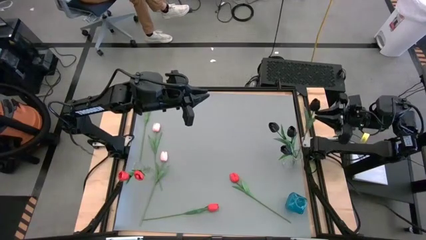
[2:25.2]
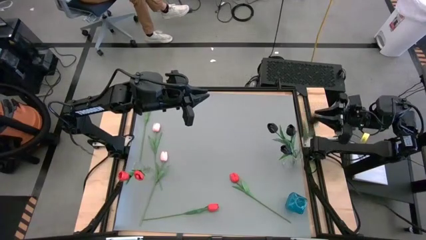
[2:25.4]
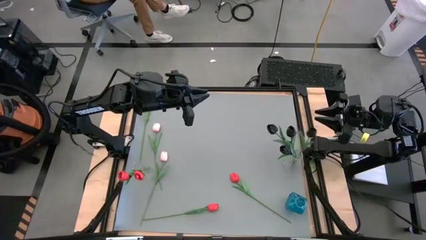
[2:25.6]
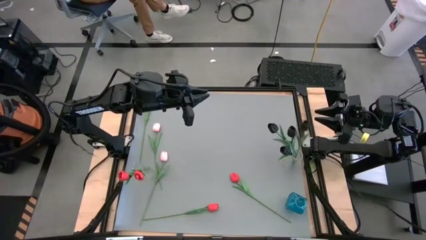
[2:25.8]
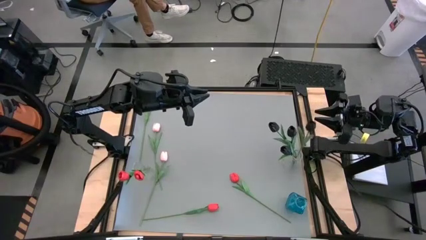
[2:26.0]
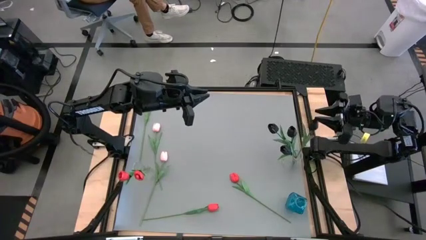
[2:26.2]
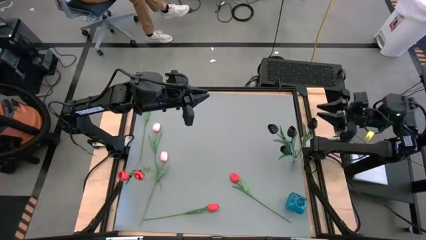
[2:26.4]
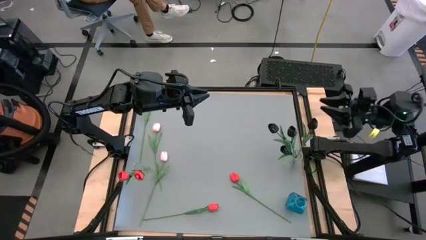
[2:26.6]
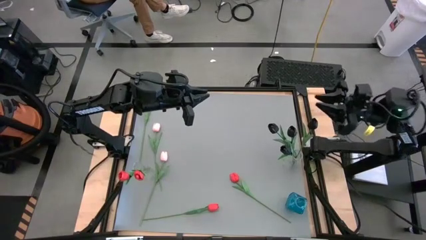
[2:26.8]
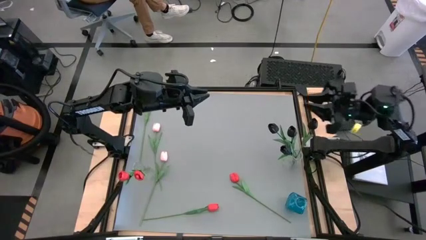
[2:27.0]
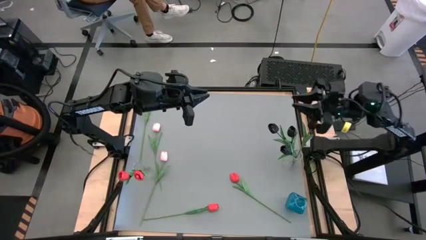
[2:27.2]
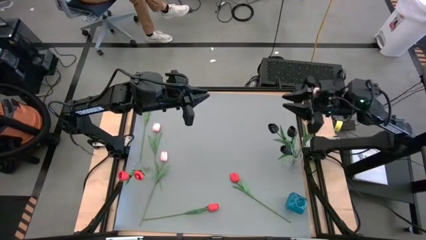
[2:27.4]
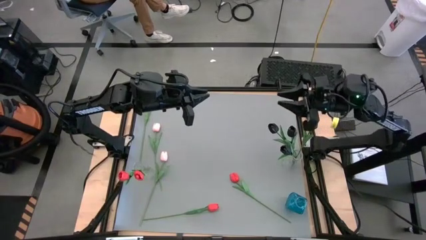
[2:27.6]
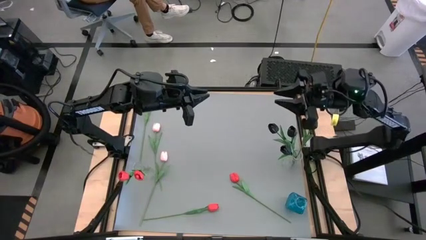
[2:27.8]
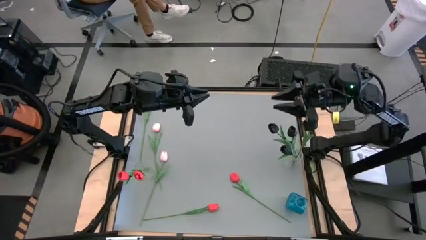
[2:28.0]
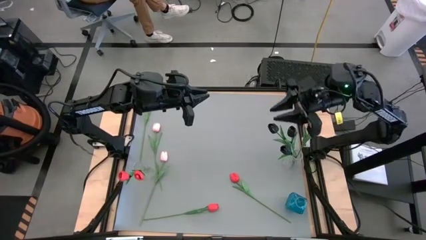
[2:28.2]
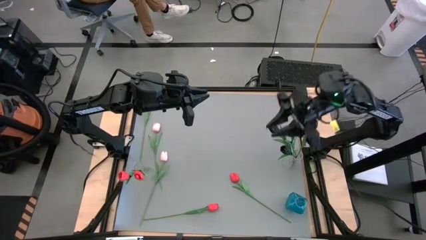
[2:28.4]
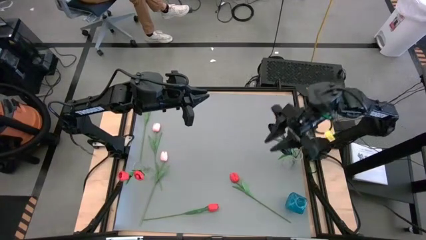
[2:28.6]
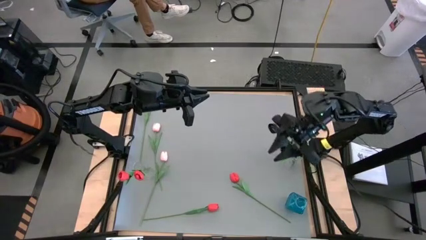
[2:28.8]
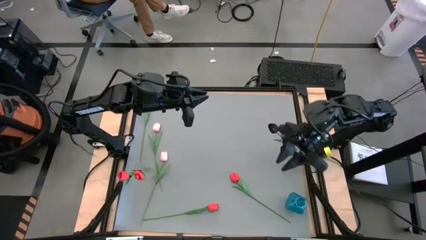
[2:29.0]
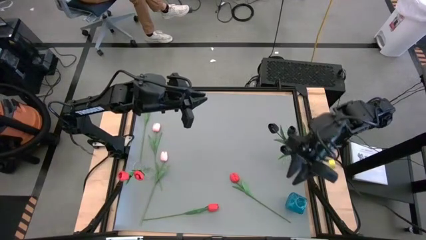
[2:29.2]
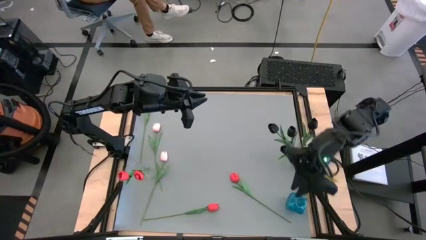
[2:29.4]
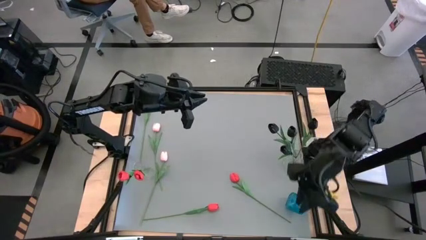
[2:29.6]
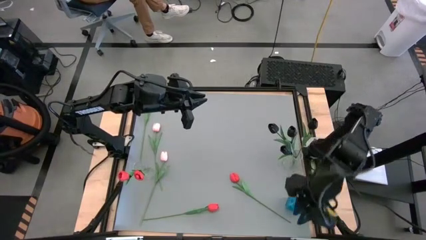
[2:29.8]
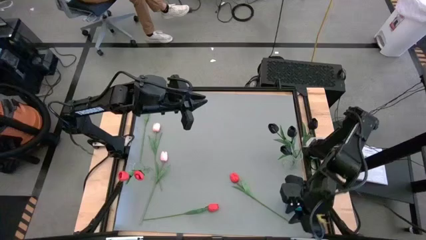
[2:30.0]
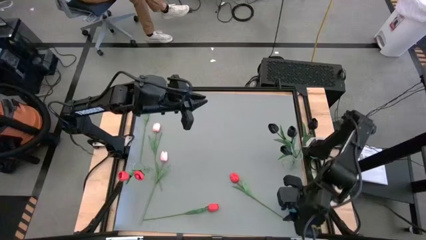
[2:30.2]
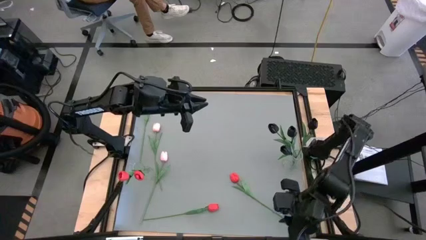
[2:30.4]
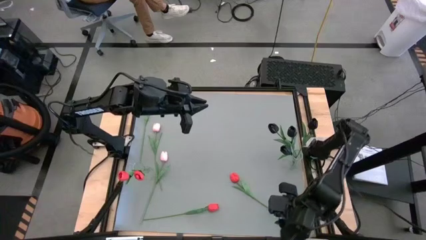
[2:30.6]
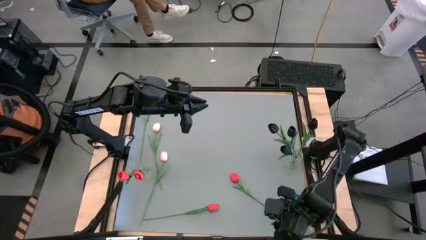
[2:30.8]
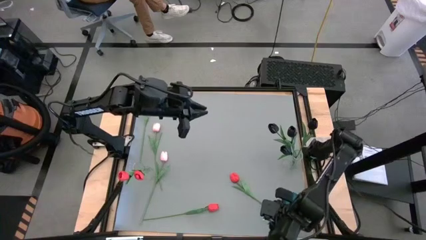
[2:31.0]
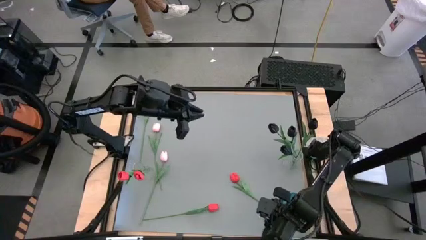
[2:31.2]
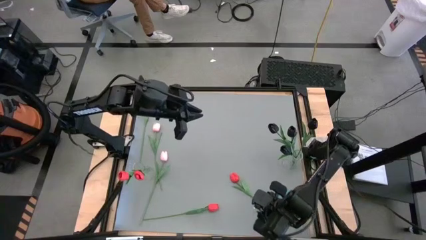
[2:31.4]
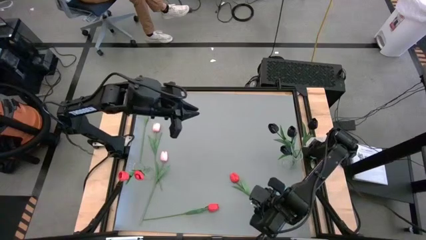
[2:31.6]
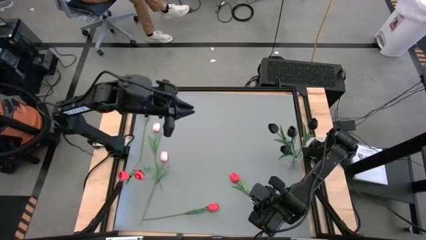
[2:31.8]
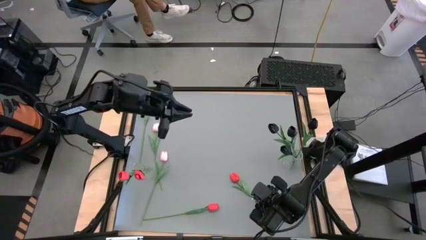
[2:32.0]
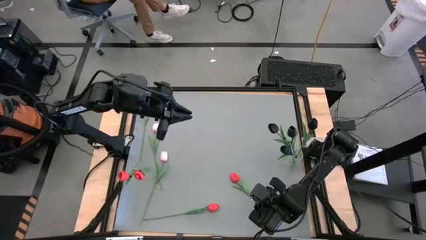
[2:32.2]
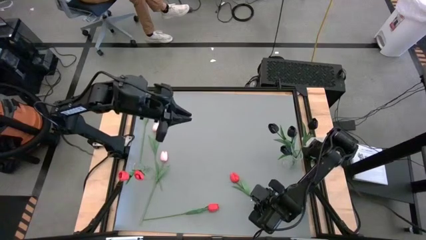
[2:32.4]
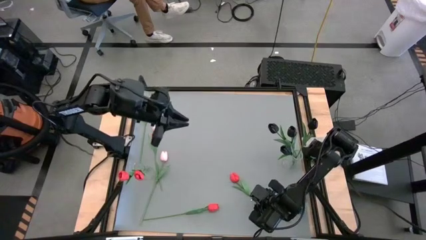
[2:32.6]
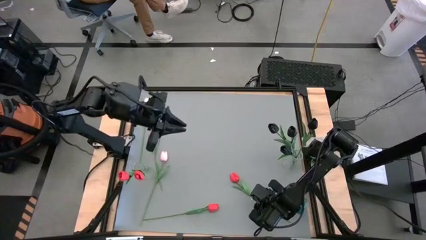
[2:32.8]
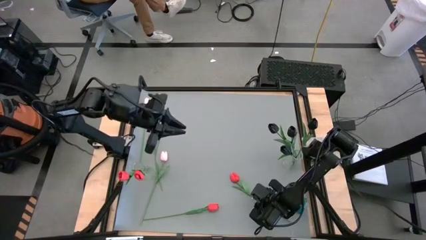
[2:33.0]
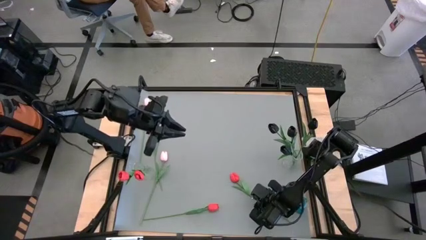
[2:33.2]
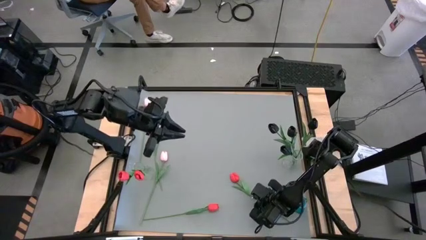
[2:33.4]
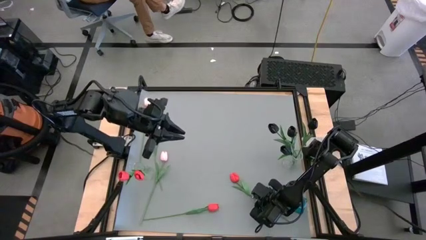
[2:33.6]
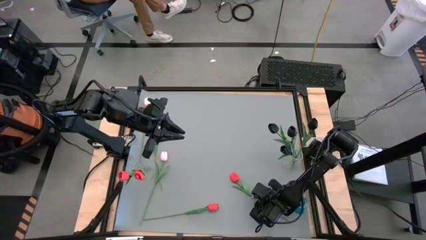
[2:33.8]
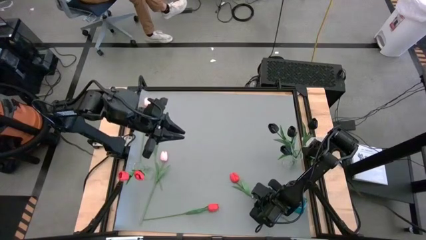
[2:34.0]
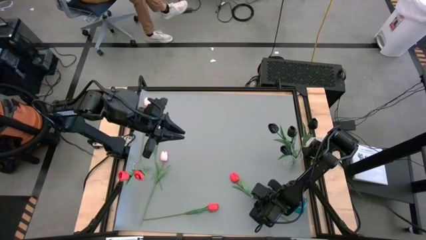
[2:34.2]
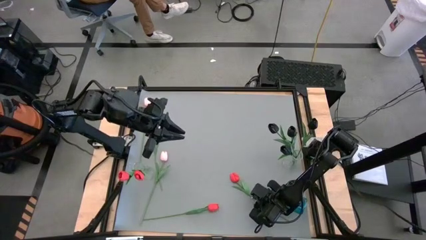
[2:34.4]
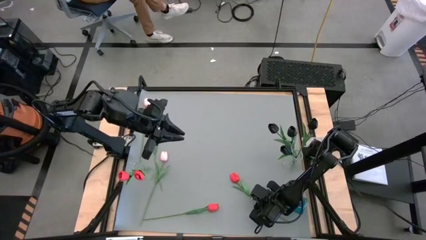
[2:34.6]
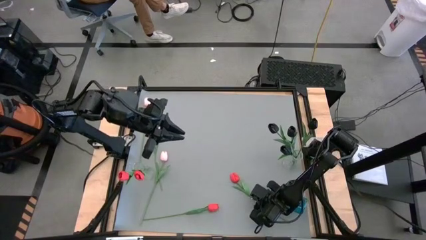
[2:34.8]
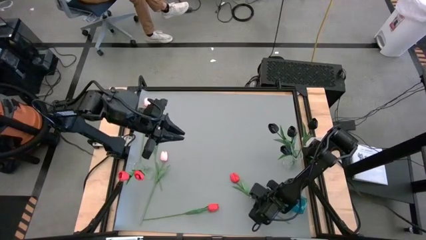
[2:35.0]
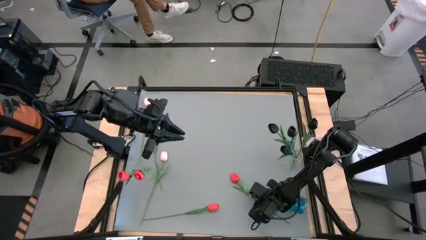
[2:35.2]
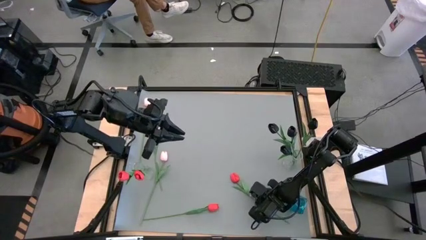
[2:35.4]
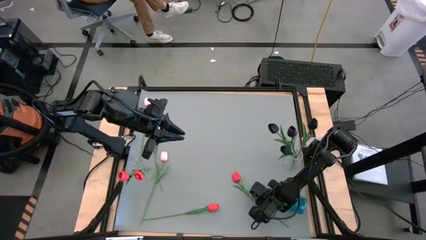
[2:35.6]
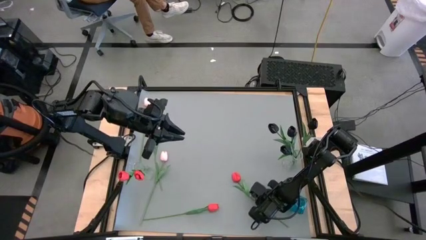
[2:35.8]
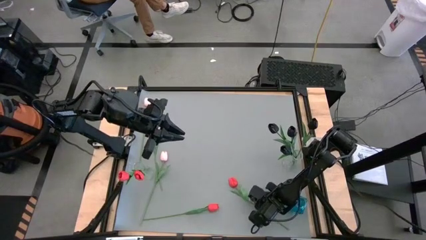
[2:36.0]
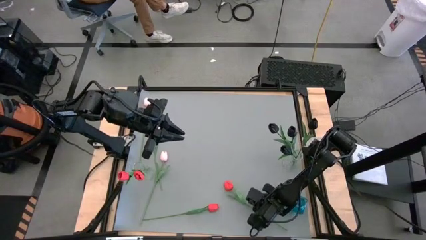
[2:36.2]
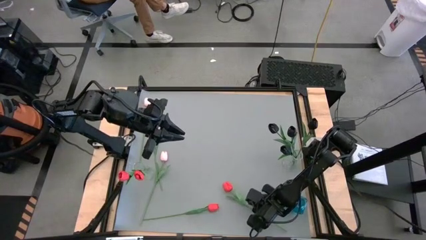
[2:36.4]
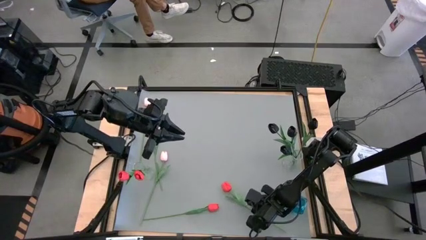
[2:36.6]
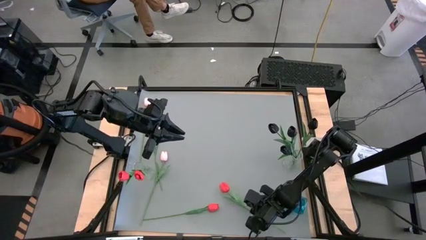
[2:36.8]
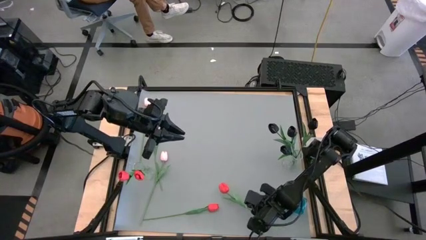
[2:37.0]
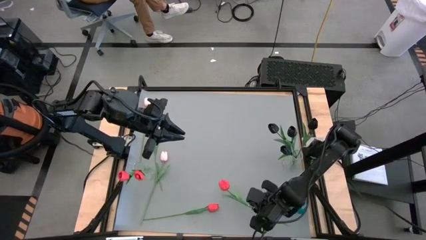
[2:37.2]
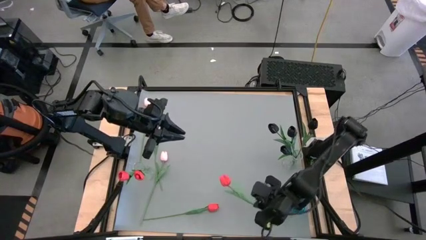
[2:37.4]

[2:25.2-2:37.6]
Task: Sort flowers into vase by color
Put the right red tulip into the left transparent vase

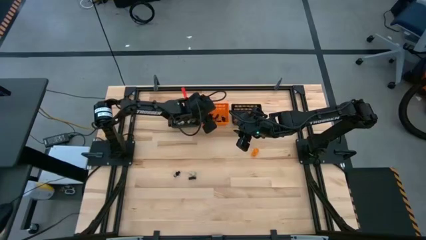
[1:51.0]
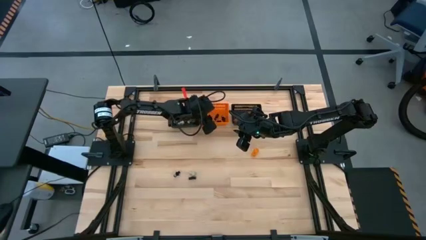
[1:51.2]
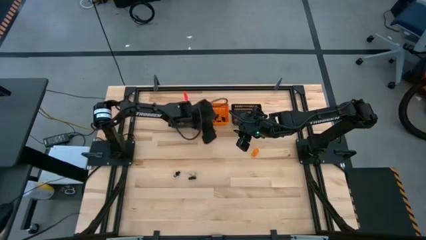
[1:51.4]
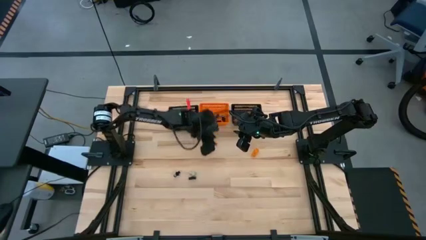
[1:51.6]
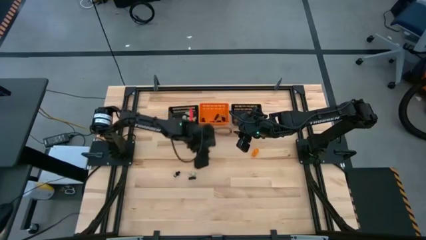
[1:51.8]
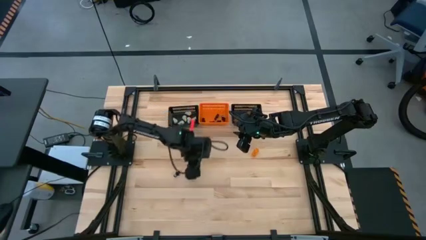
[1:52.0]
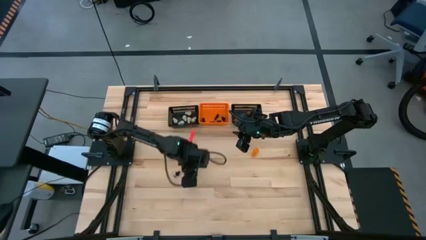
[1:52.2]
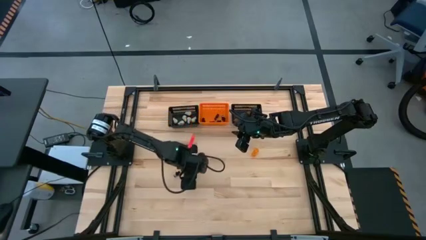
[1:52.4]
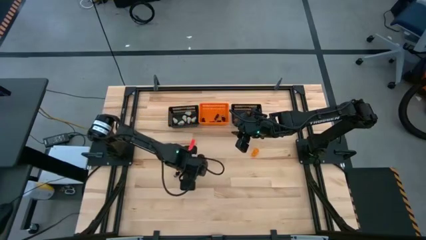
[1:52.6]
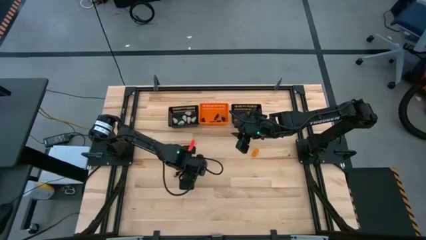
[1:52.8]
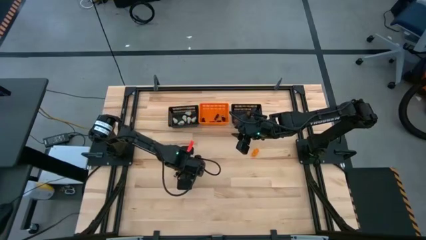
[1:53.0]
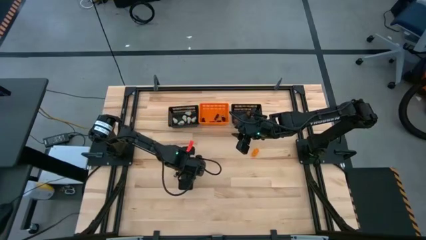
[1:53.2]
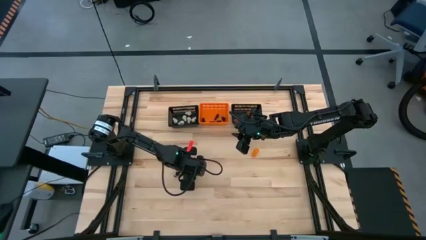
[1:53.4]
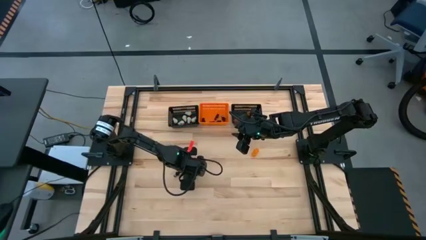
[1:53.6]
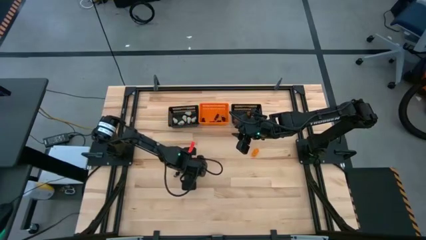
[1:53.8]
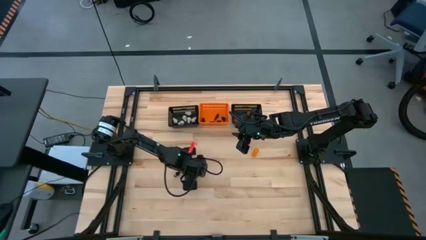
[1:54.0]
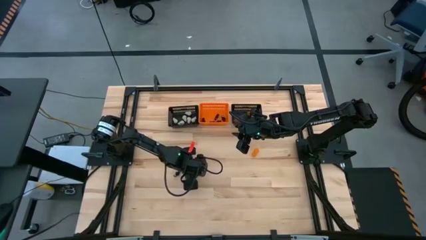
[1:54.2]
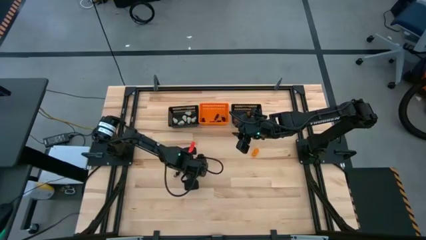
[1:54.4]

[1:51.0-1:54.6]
Task: Sort Halloween decoration
Put the white skull toy into the left black bin
